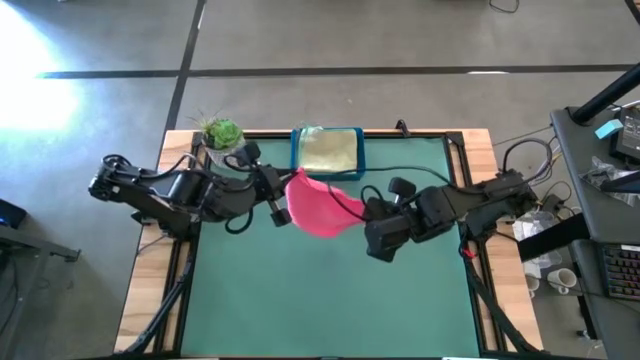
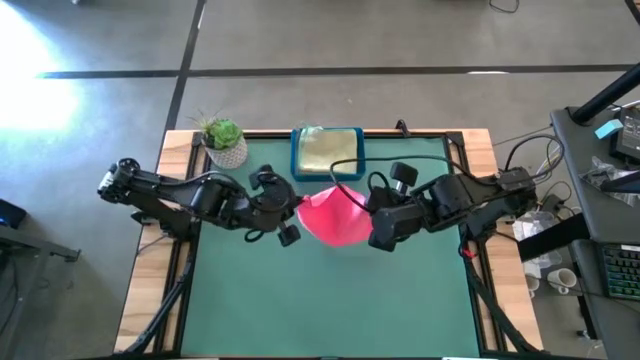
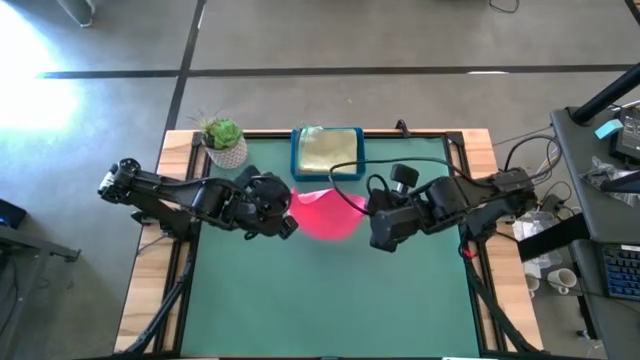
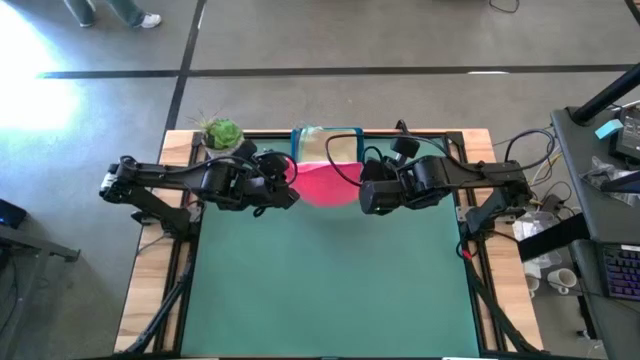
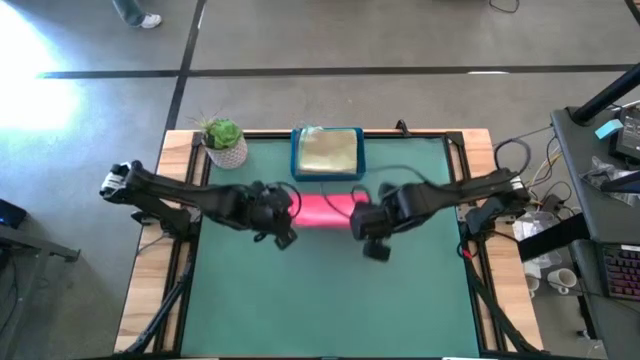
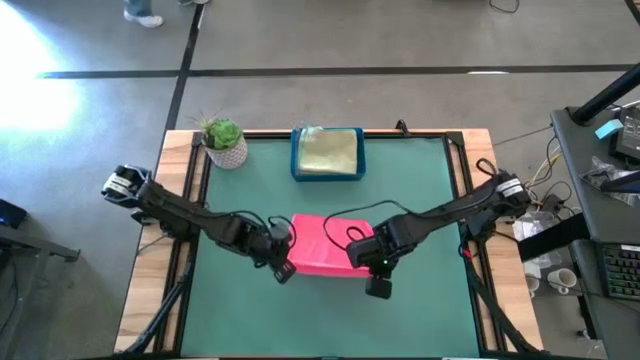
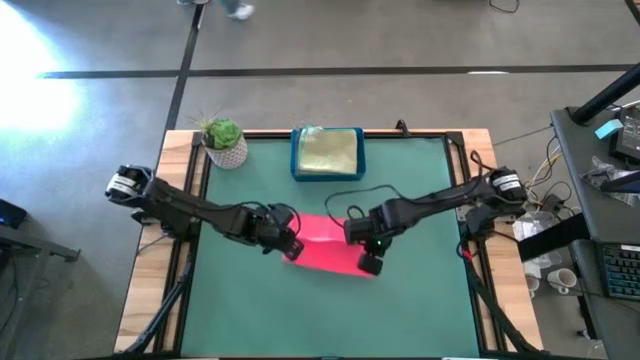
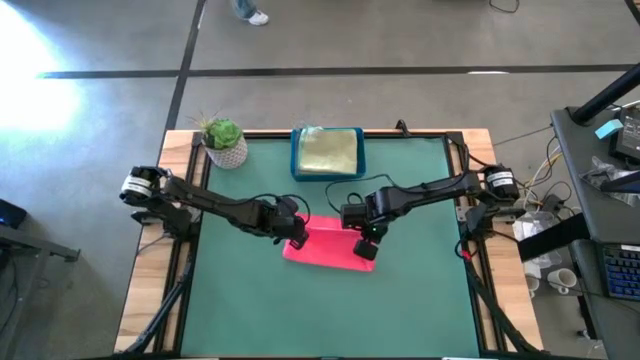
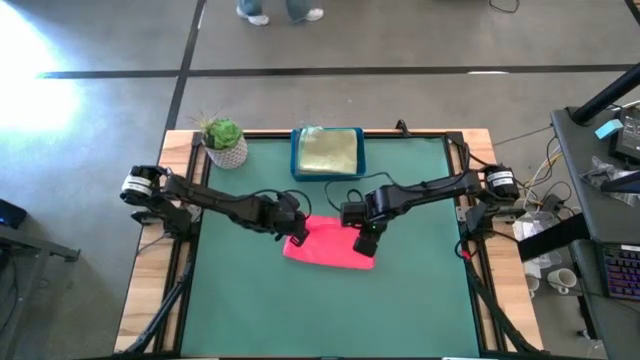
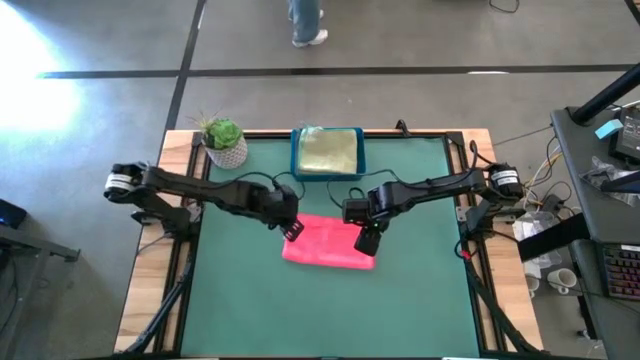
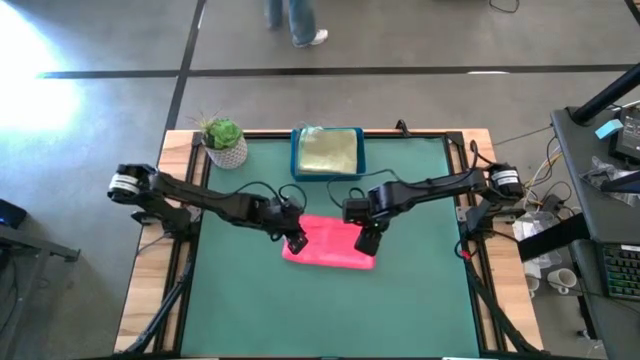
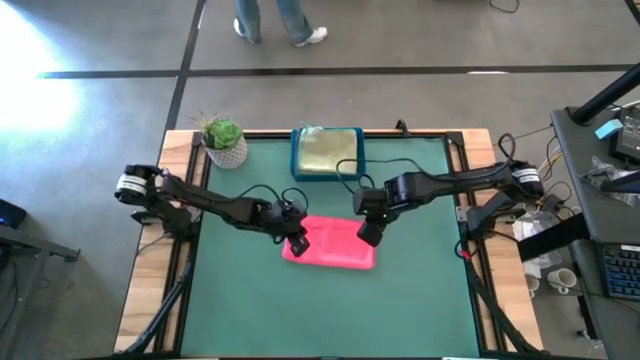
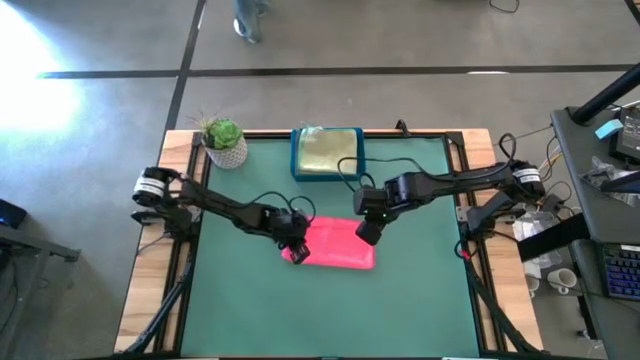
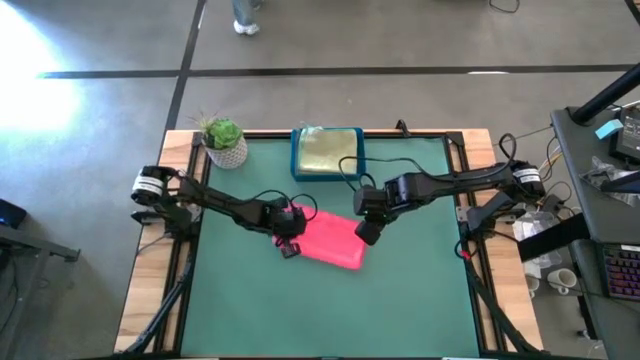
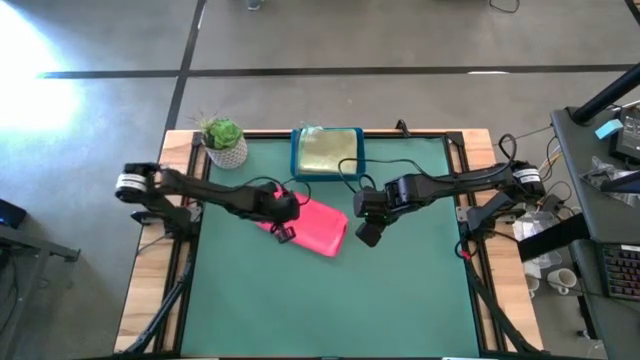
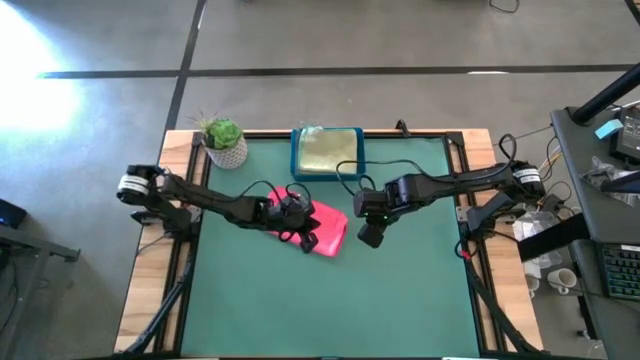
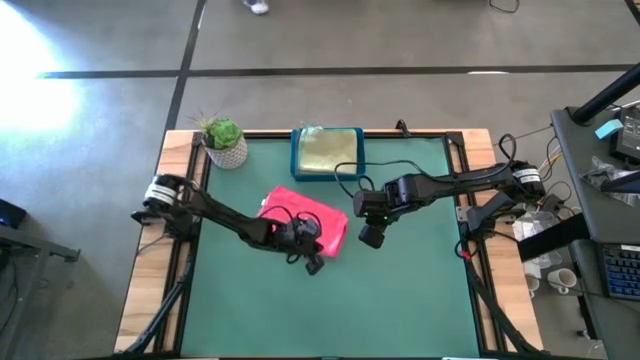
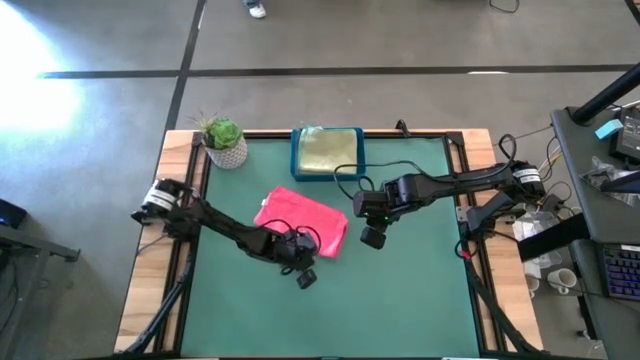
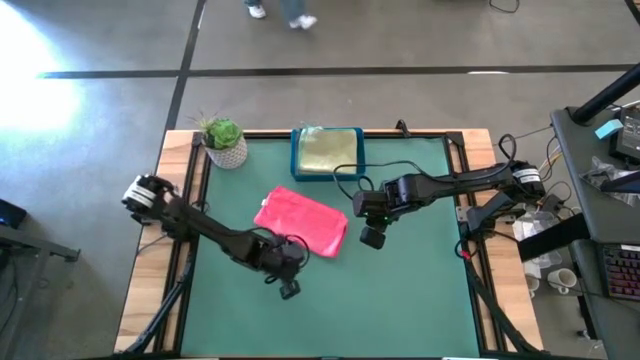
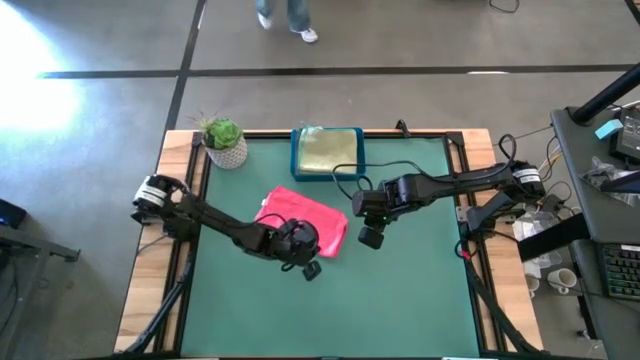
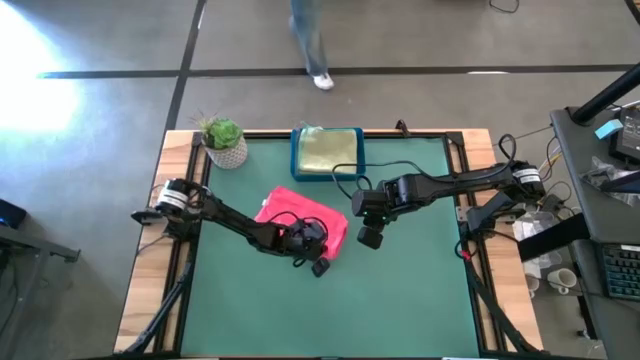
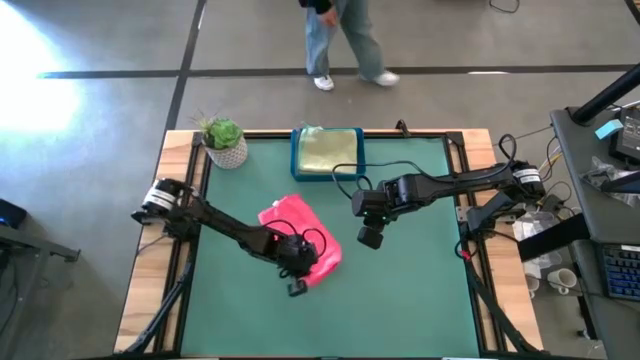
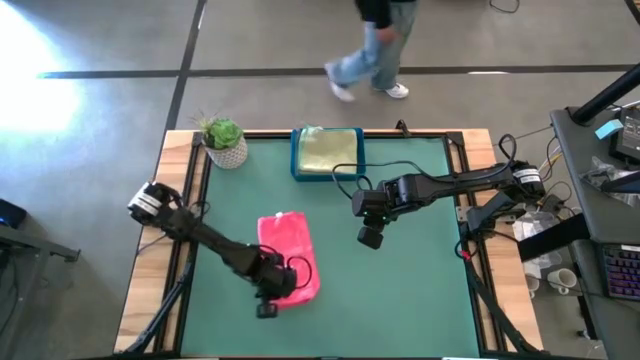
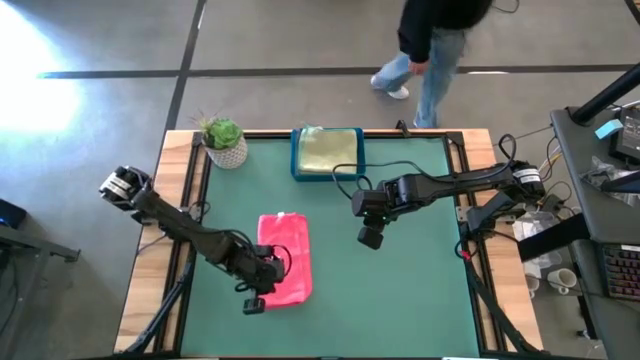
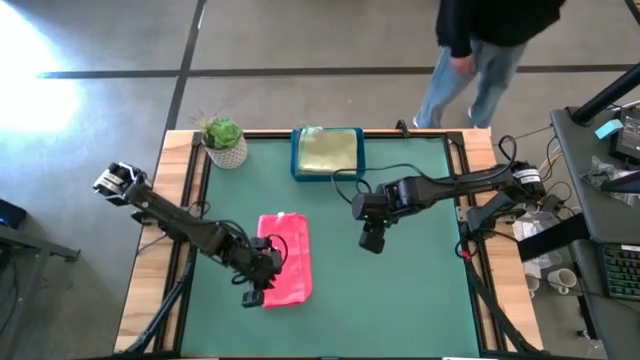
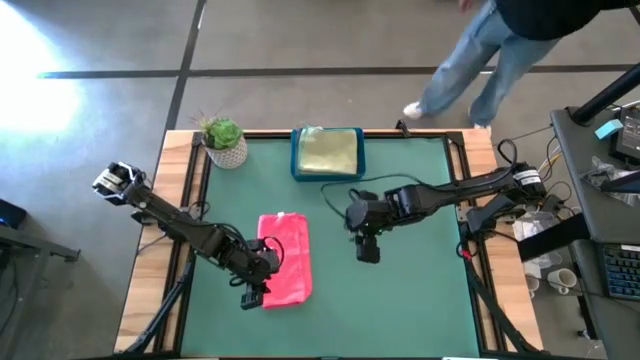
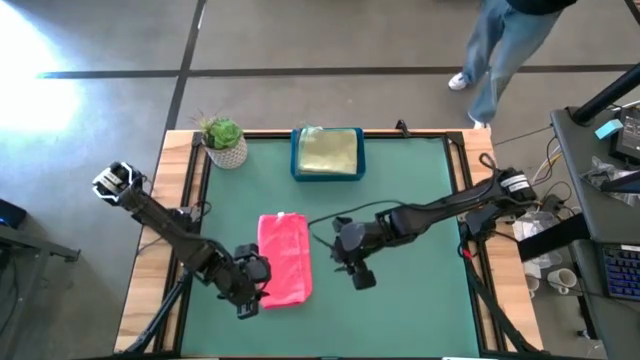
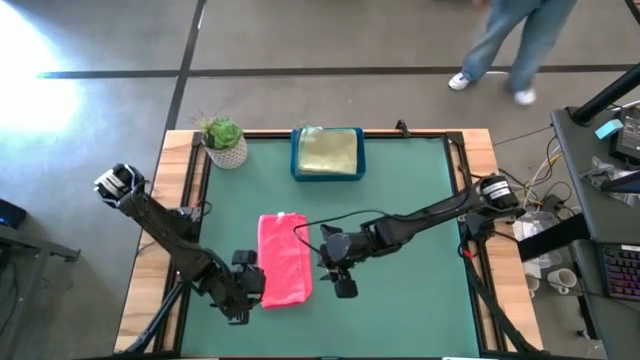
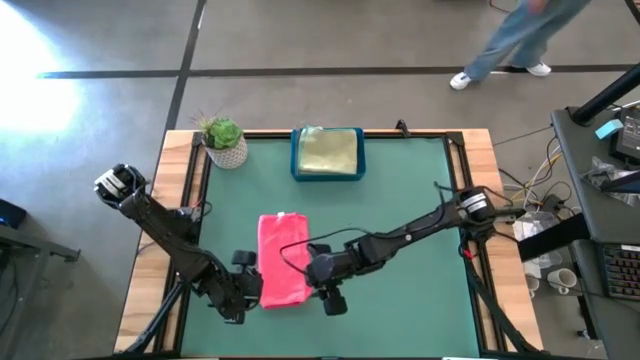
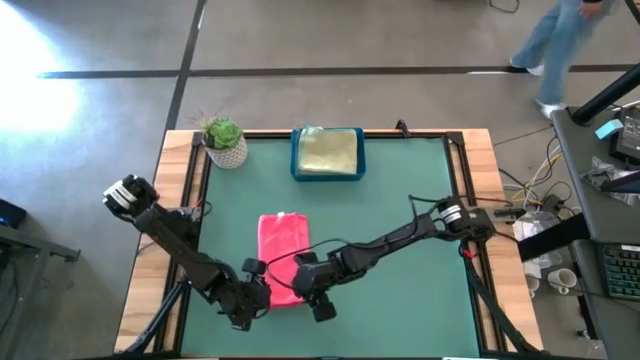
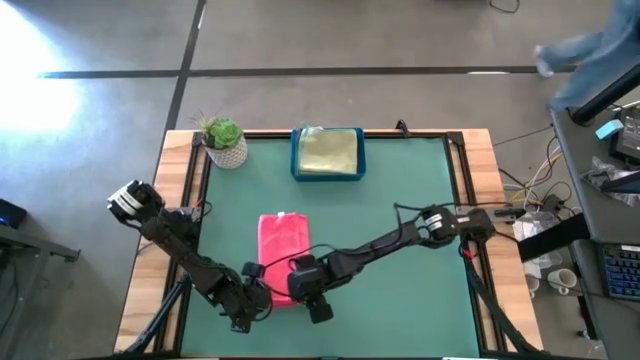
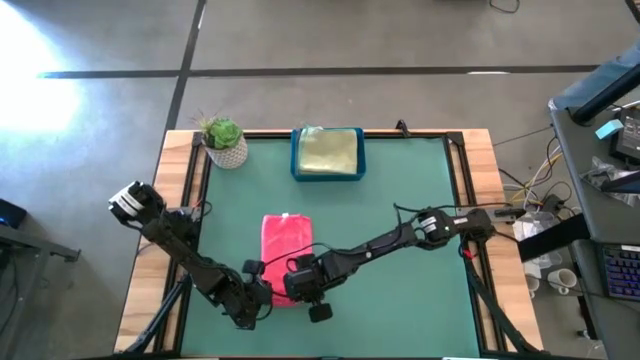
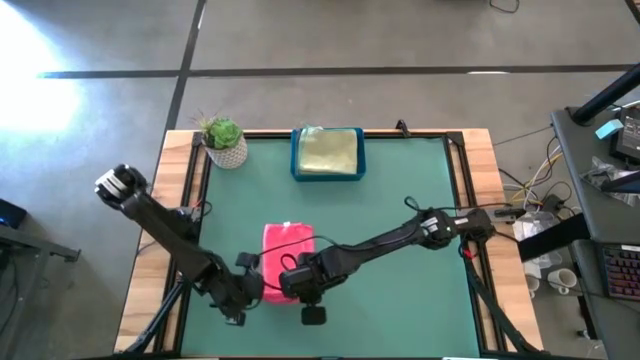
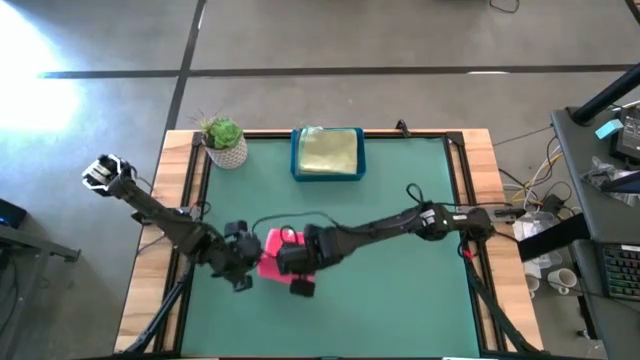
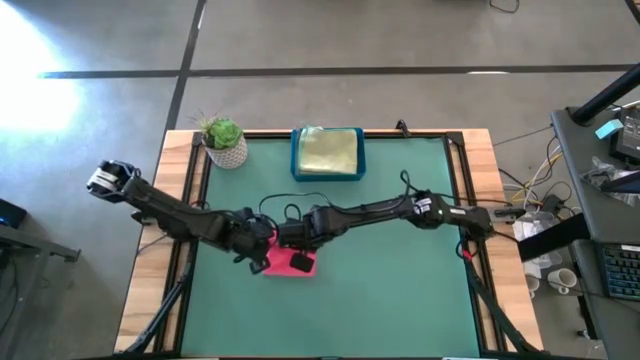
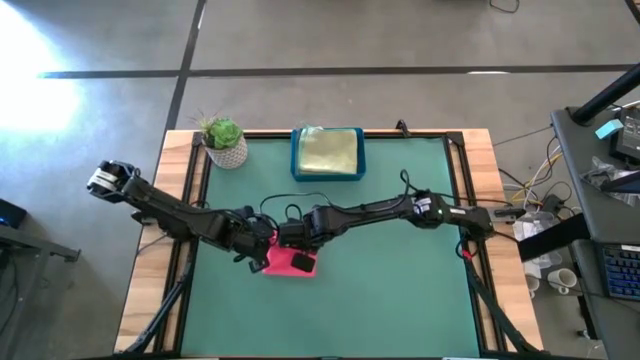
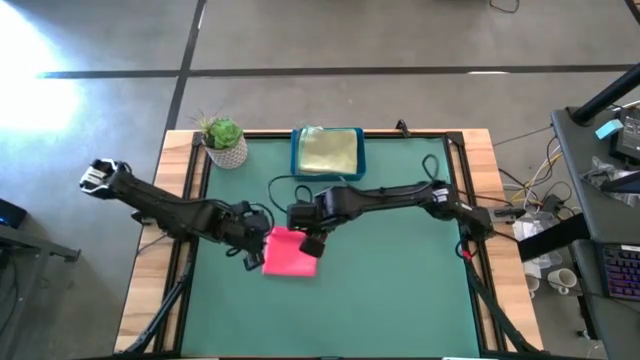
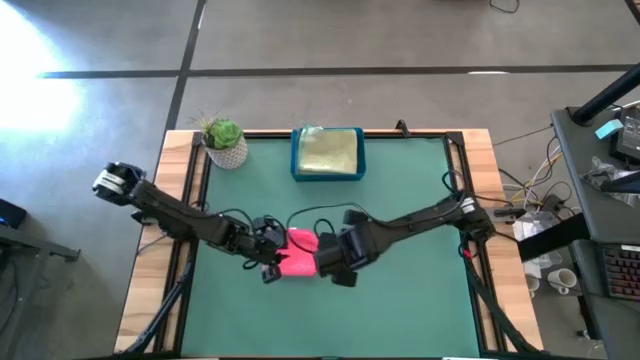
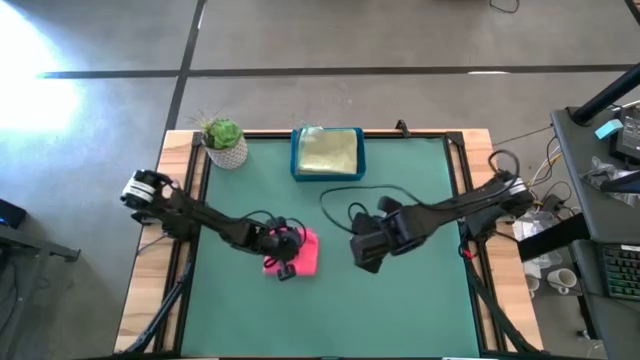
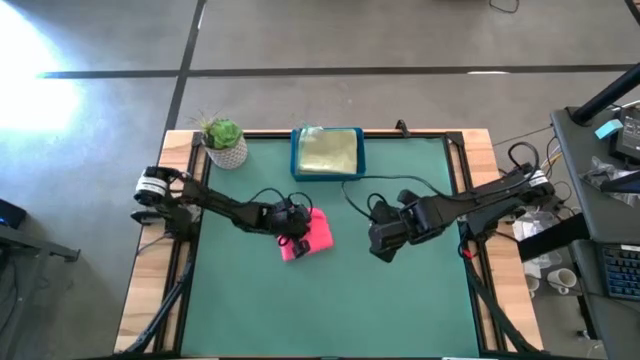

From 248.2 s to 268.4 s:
Task: Fold microfiber towels
Fold the pink microfiber cloth
